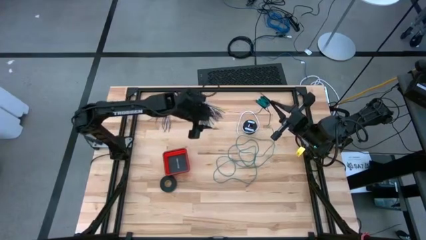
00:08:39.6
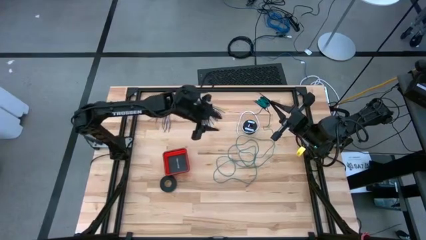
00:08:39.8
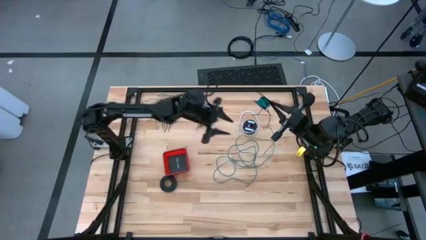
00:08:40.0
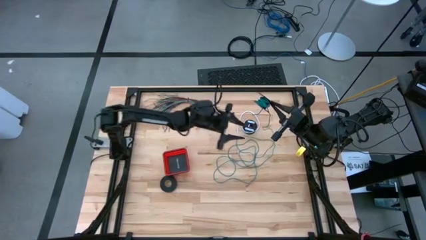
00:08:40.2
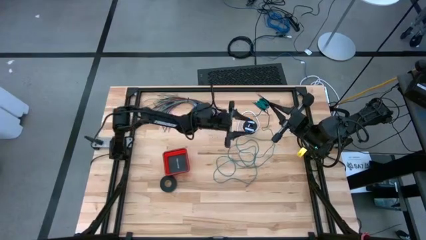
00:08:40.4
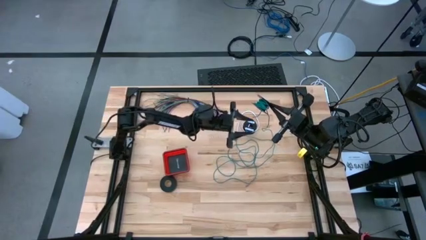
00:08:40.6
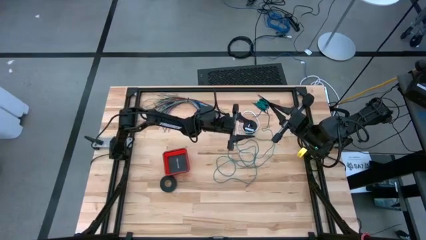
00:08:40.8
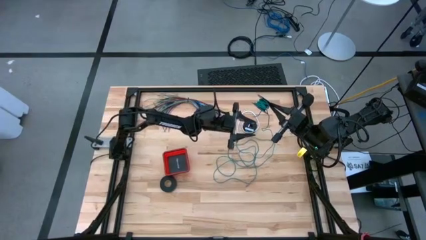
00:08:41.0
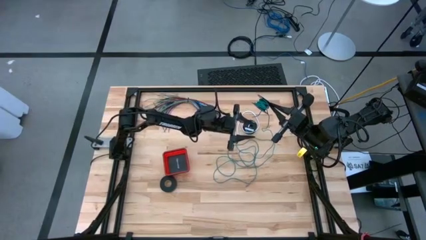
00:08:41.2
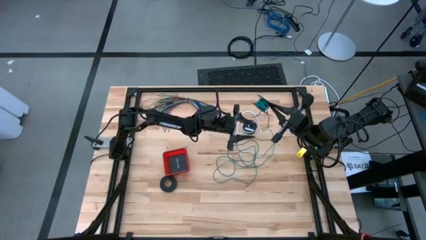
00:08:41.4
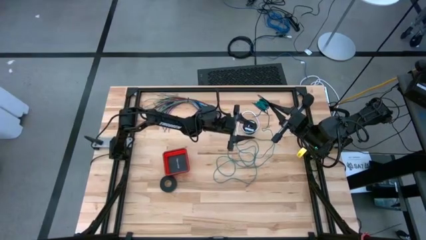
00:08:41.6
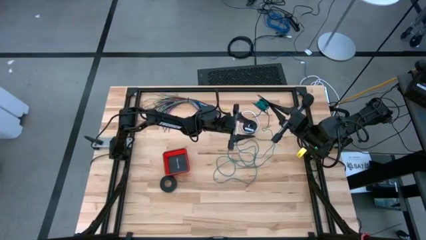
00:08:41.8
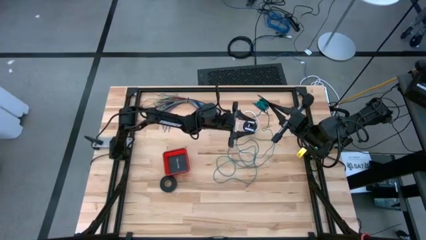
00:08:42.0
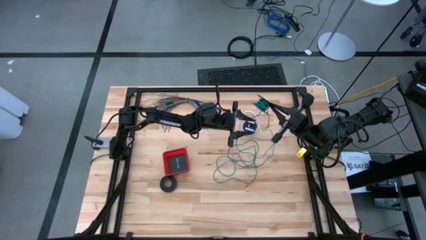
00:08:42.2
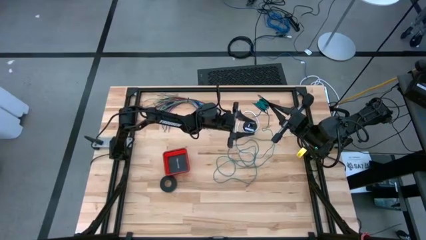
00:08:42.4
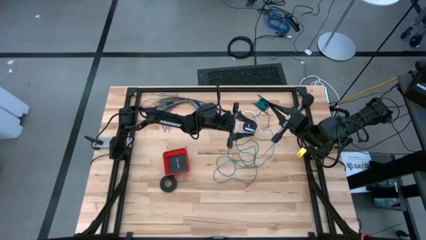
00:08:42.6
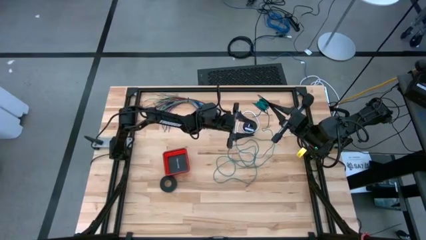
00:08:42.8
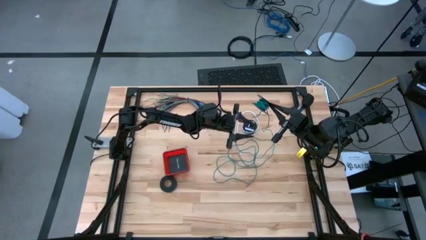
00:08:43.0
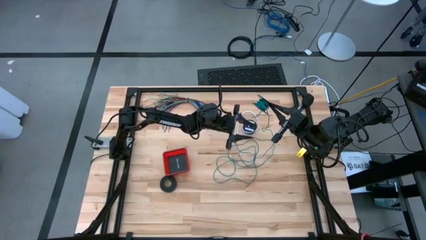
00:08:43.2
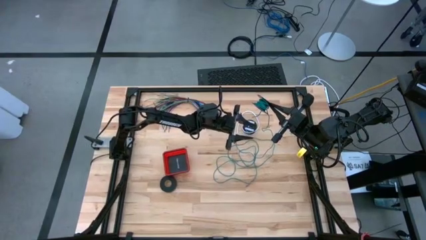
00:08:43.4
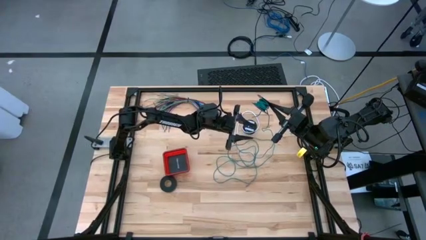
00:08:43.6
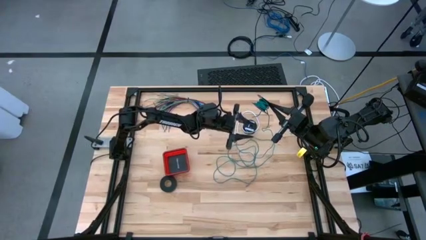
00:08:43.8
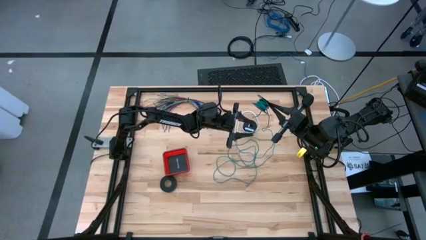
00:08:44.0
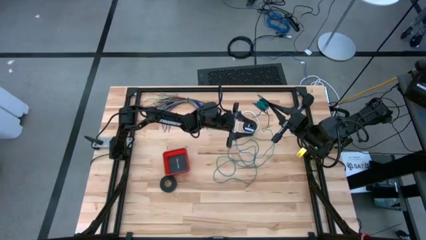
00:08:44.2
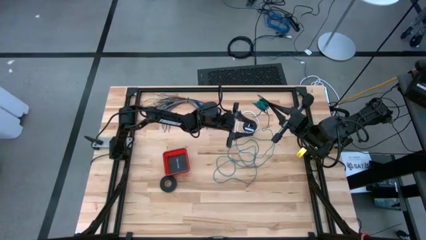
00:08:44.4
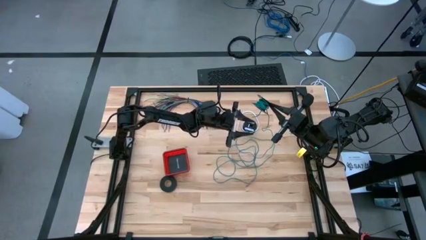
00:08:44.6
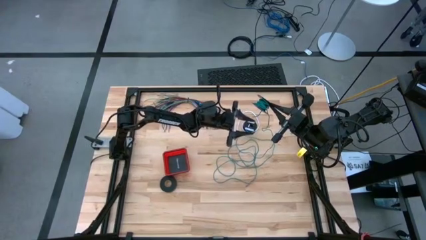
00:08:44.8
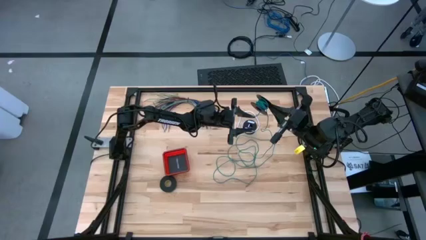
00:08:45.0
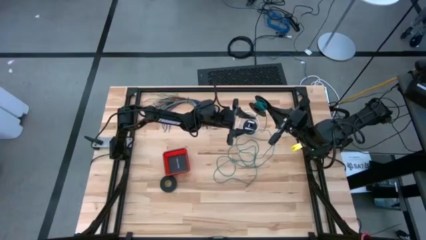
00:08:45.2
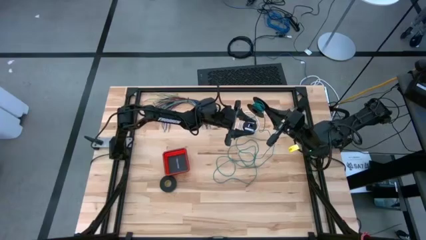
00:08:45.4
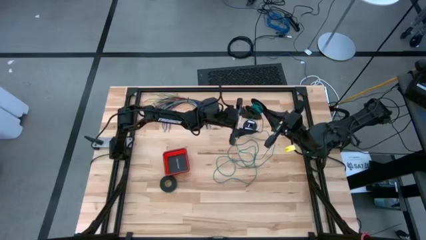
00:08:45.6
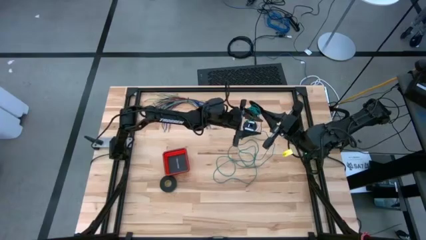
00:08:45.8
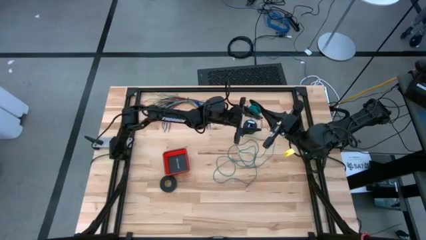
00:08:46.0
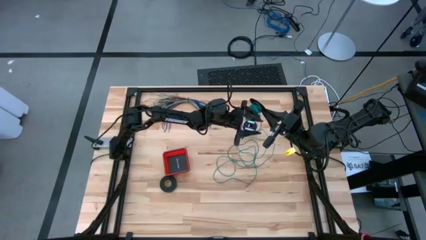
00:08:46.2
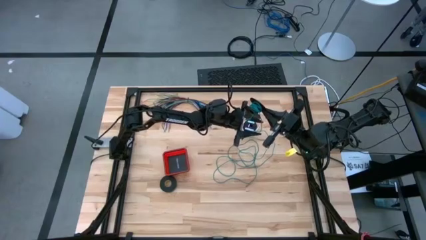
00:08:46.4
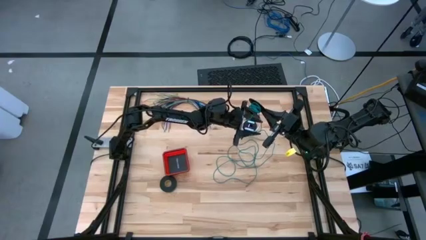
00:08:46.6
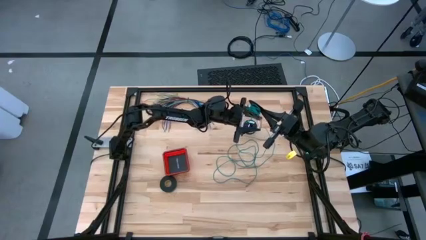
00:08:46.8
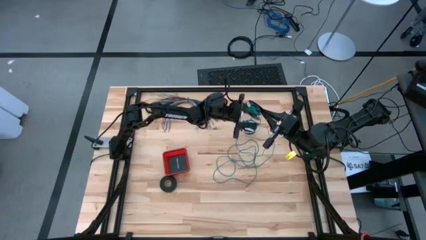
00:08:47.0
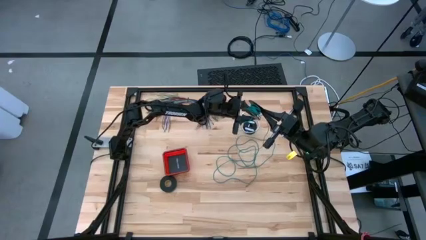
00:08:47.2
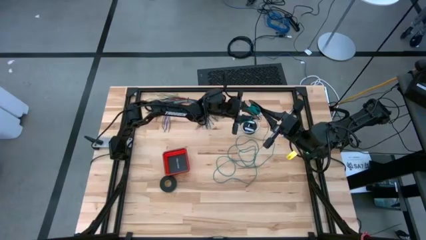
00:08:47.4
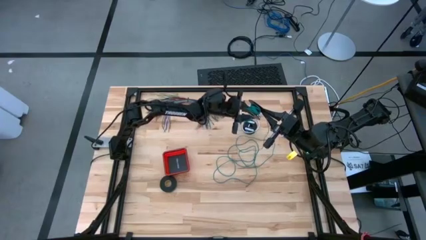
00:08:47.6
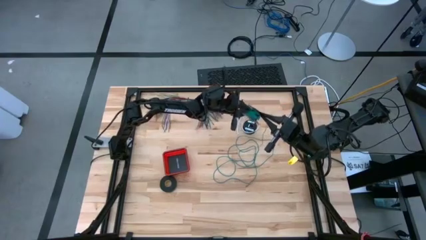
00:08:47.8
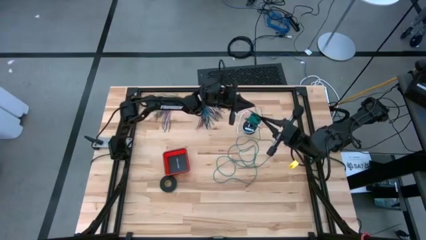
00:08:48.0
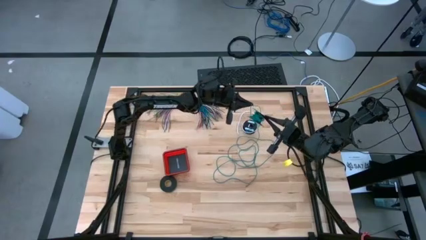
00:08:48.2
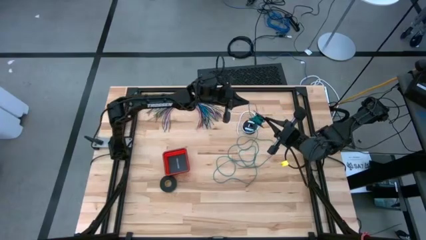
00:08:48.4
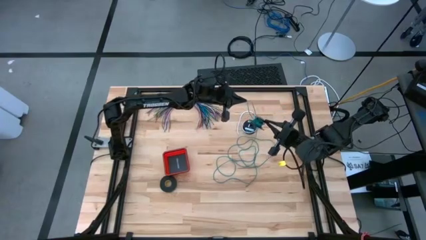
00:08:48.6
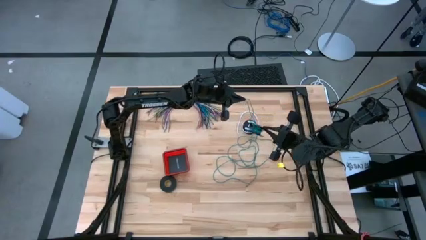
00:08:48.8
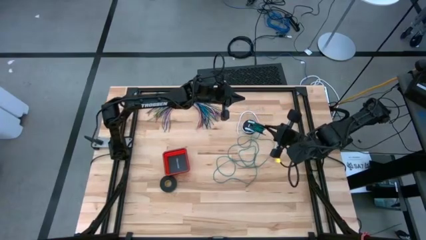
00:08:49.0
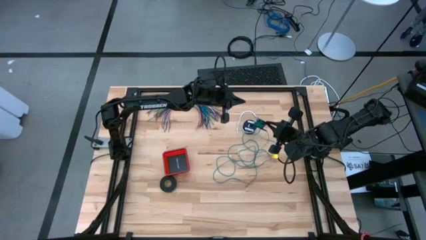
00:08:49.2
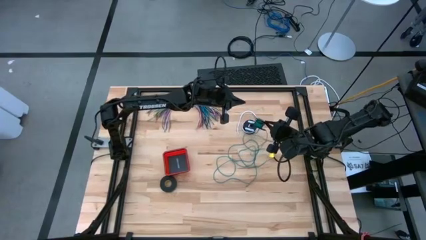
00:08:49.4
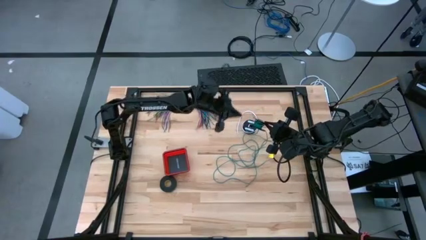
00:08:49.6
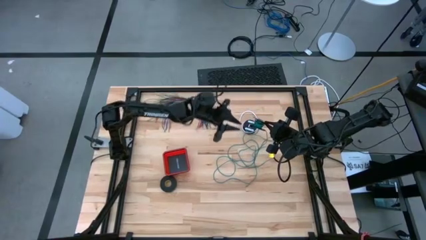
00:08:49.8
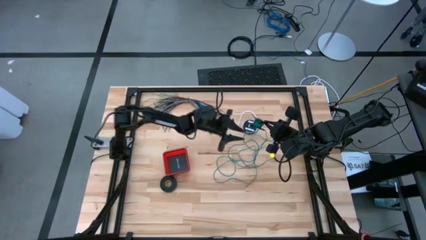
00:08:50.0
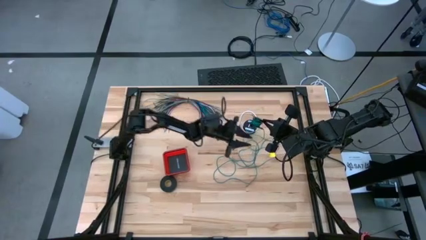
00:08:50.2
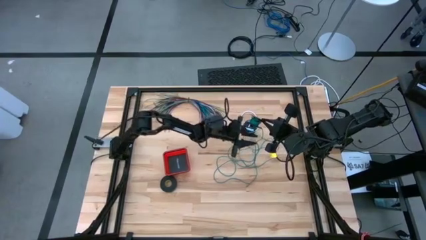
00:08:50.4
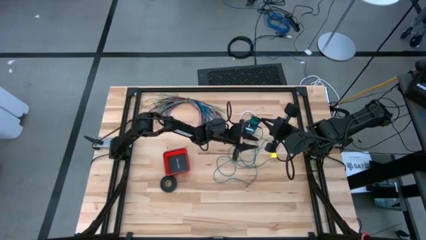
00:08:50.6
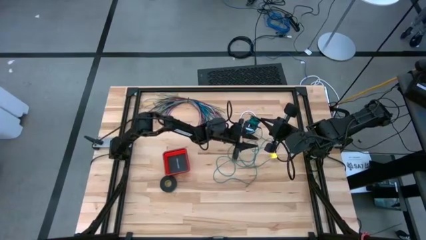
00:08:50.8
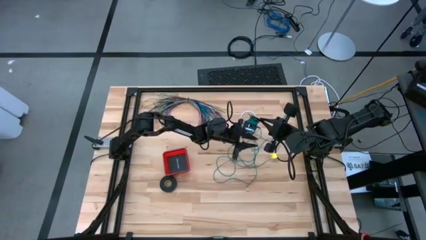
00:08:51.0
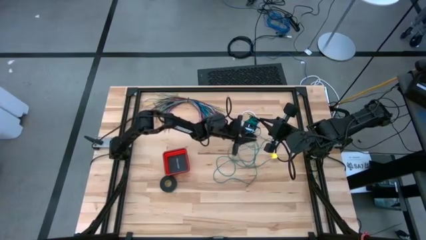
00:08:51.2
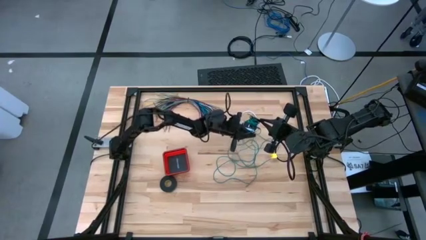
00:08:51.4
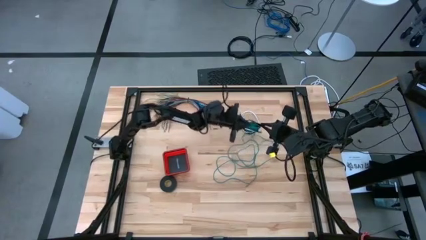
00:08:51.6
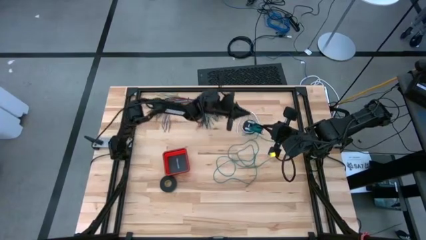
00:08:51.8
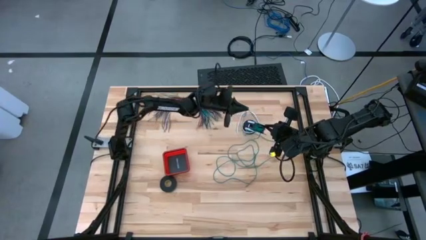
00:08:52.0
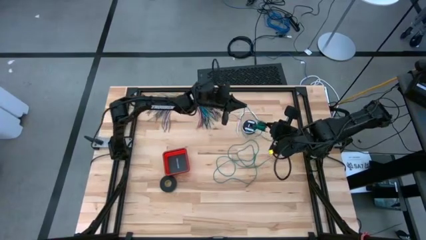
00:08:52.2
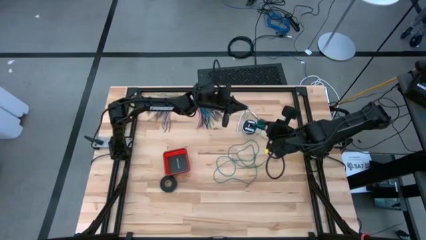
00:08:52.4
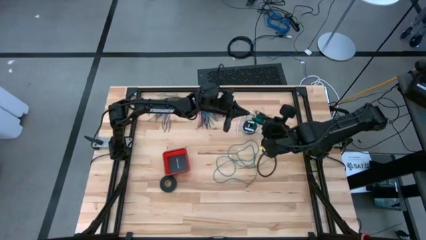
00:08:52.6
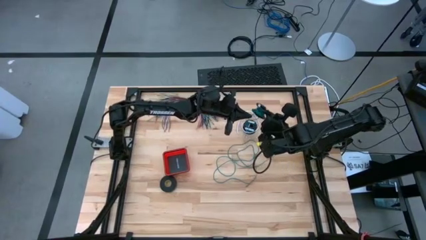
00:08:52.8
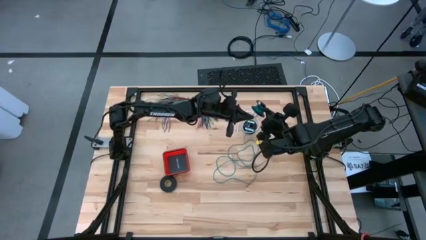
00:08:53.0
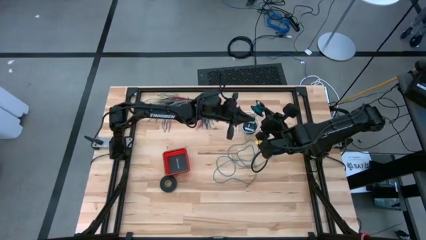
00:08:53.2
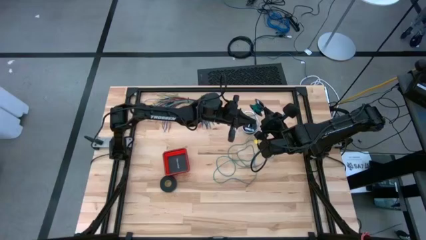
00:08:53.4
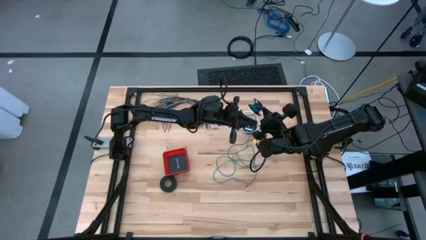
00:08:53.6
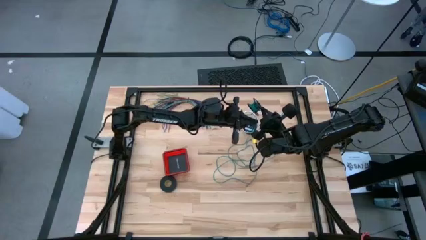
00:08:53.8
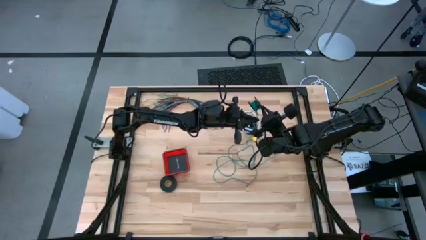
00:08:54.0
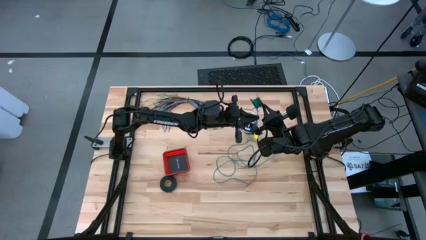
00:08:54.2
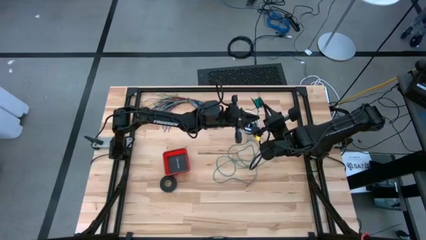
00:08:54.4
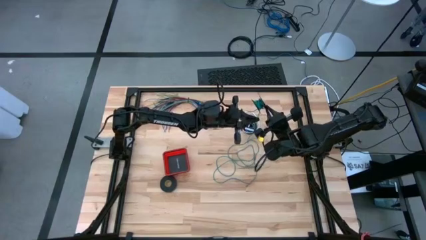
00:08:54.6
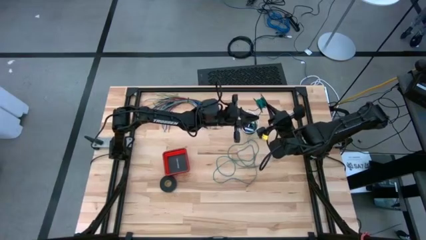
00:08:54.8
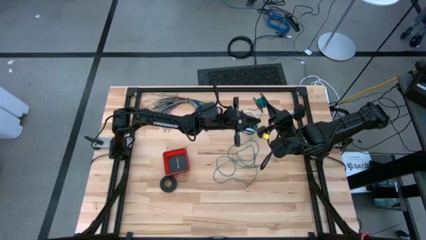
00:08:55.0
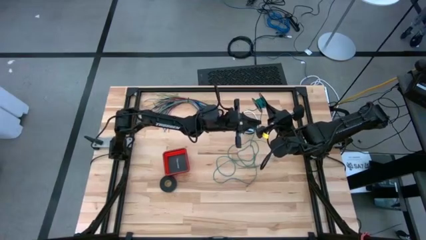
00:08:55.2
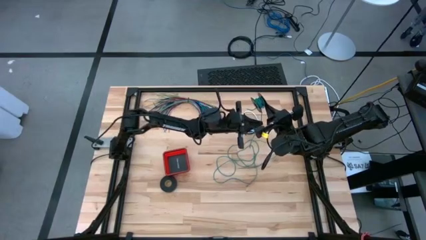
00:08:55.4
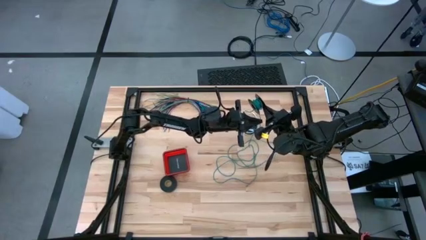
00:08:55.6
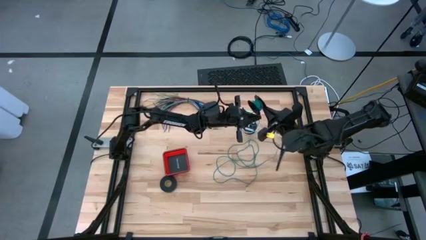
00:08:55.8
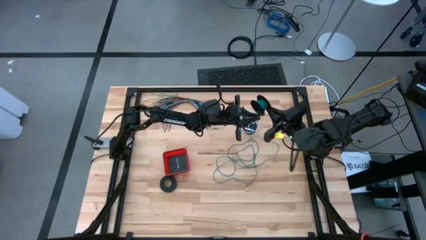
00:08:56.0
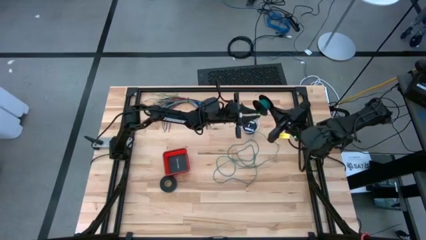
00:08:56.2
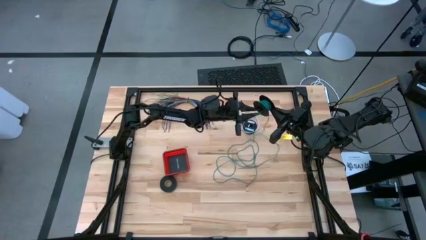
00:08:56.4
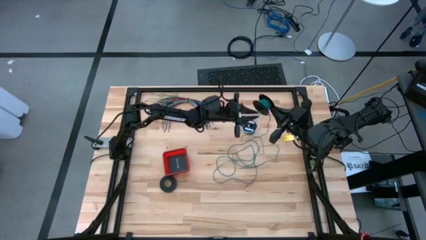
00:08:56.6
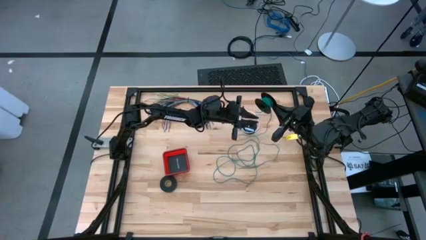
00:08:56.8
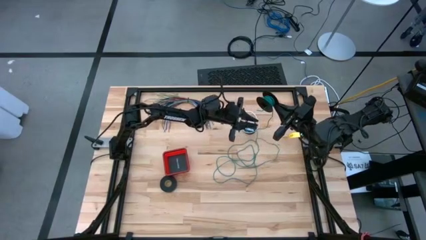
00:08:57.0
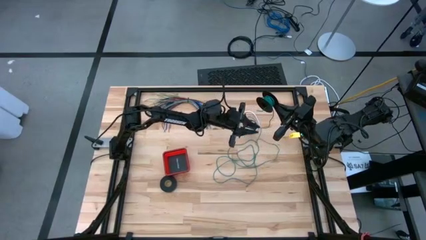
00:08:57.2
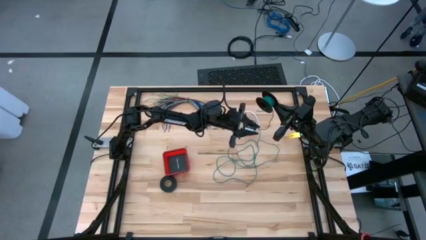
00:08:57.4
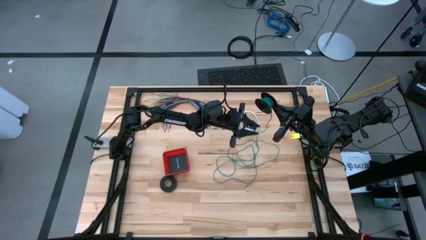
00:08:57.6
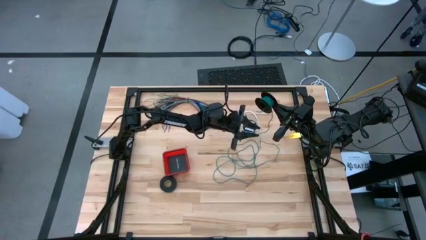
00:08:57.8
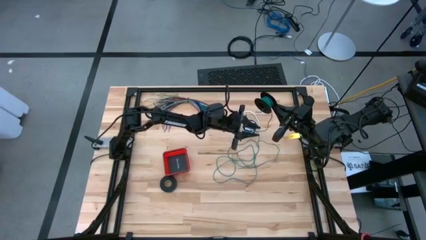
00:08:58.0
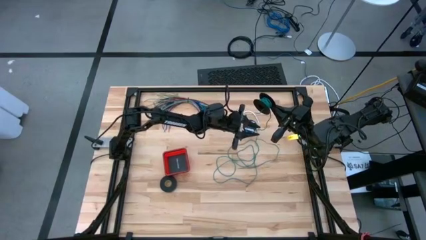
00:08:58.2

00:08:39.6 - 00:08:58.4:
Task: Coil cords
Coil the green wire onto the spool
